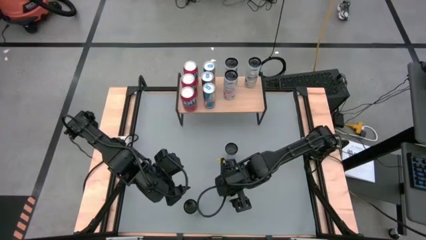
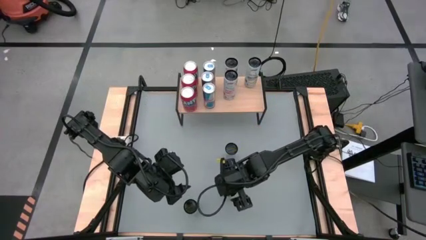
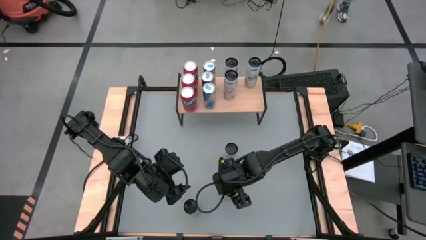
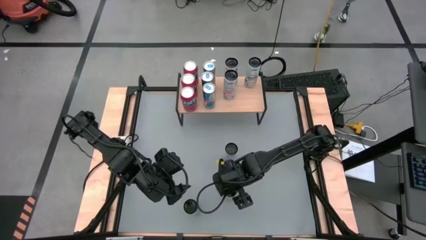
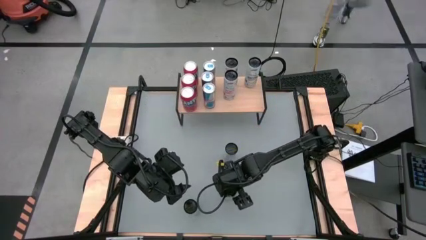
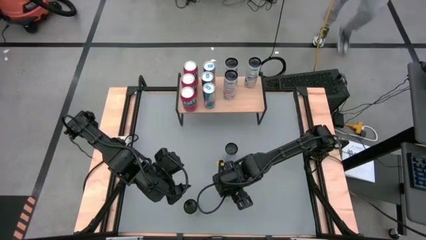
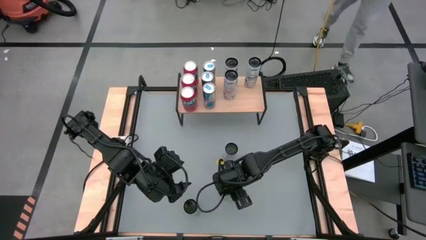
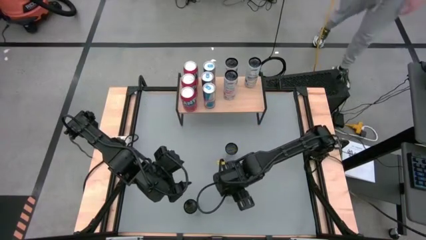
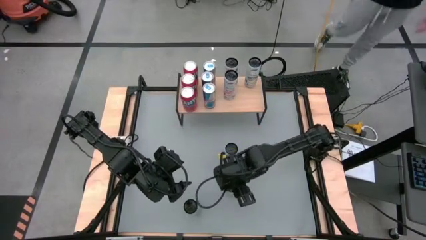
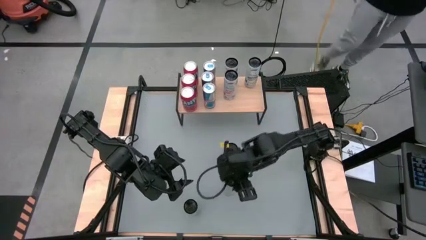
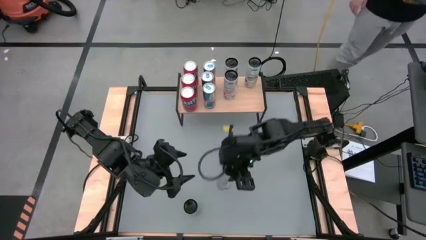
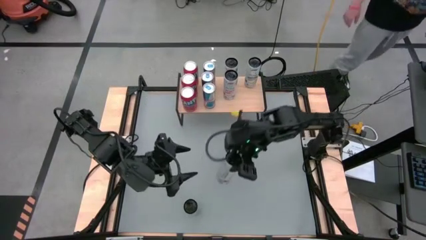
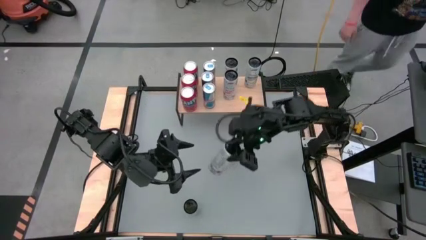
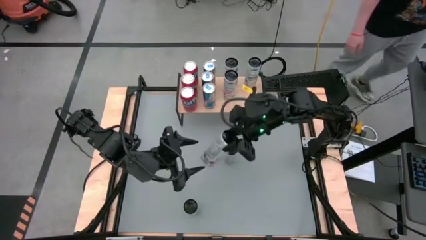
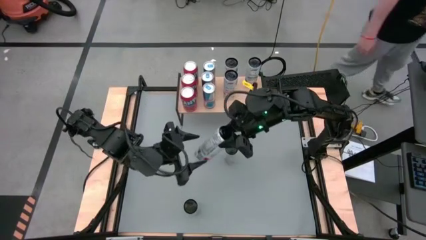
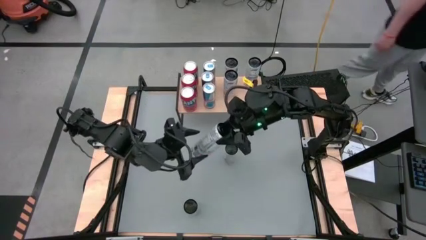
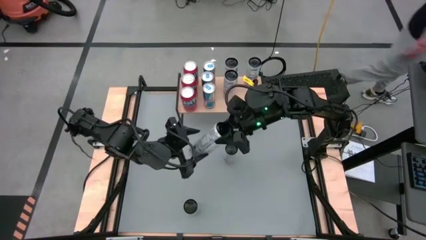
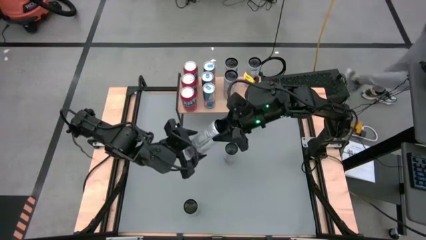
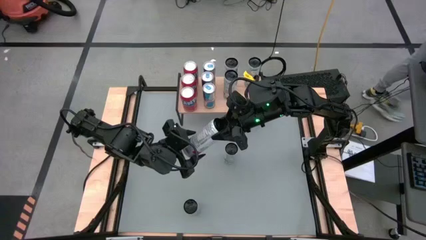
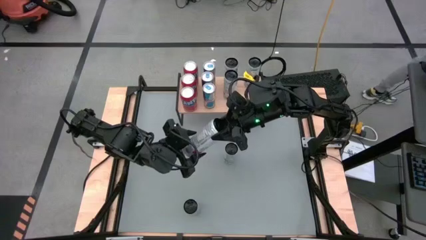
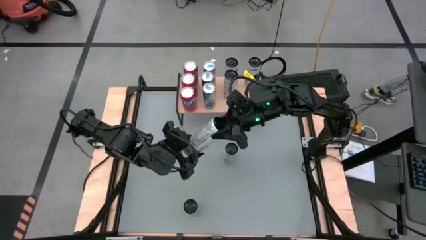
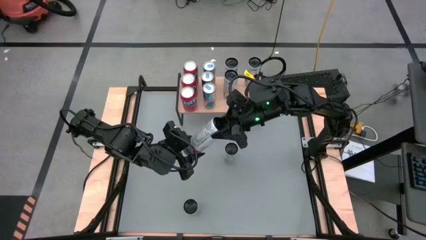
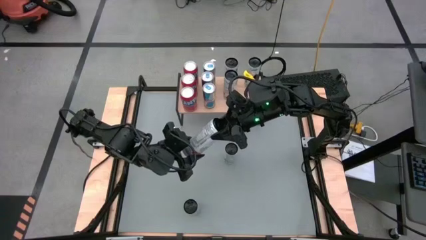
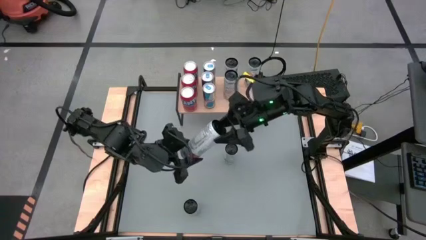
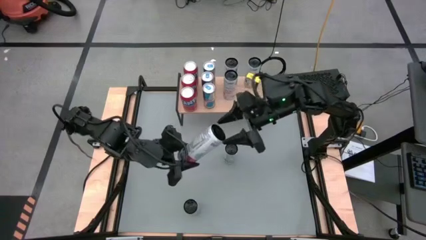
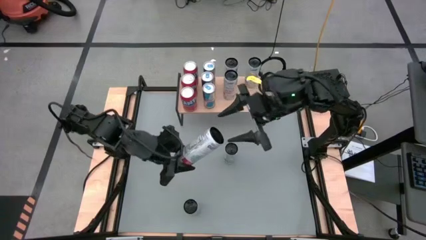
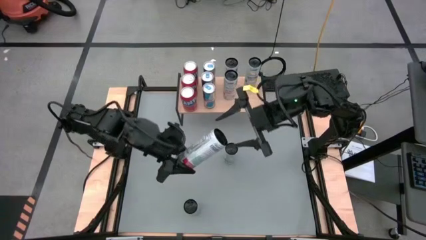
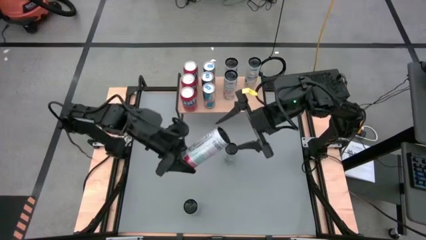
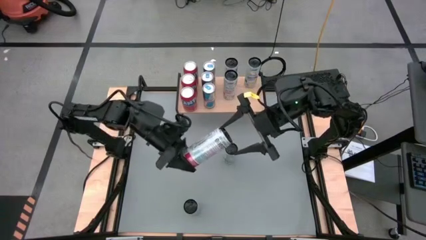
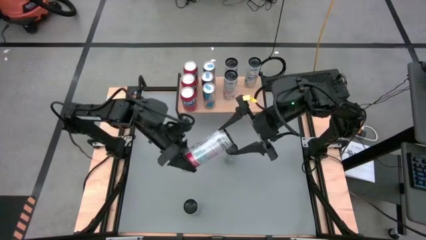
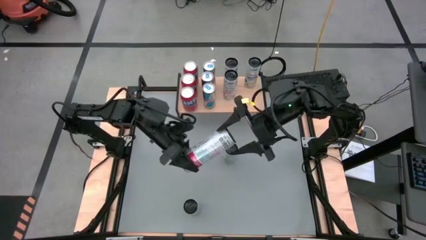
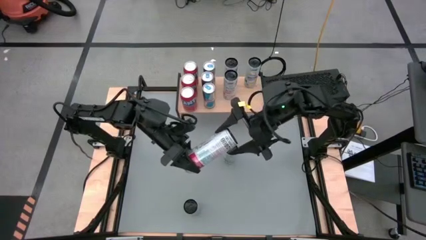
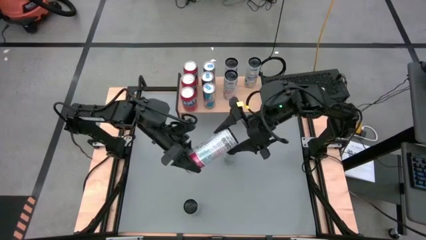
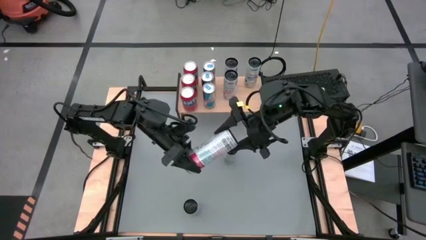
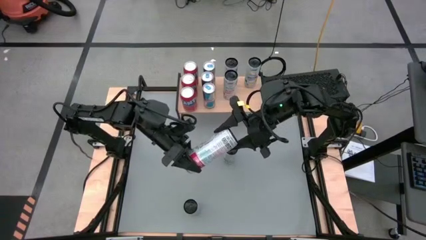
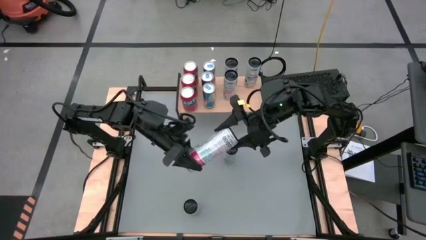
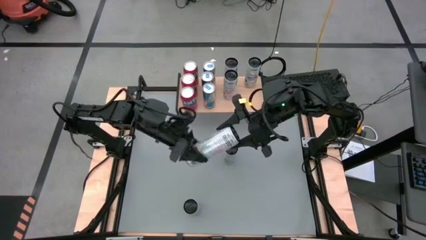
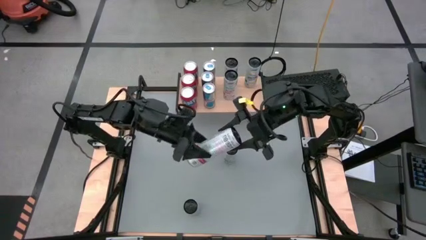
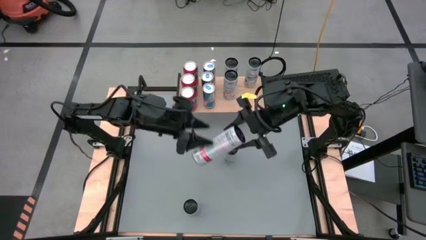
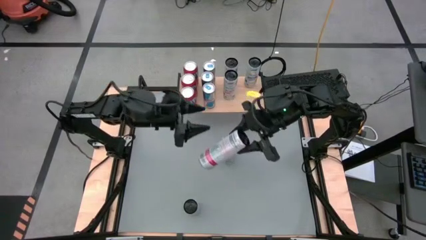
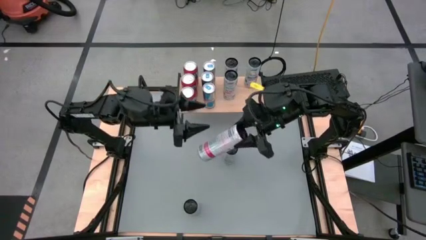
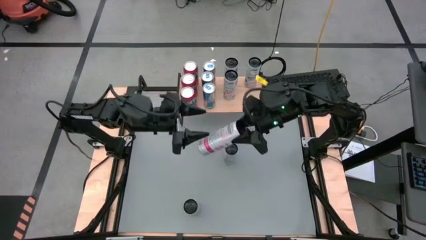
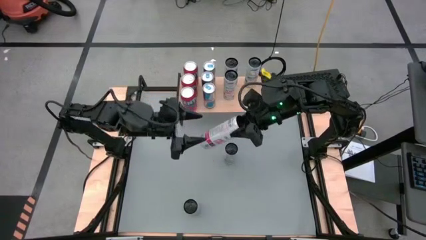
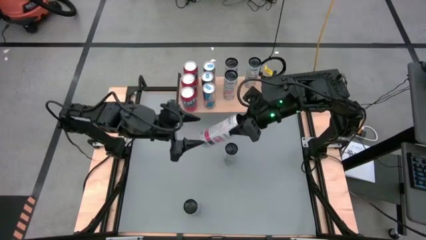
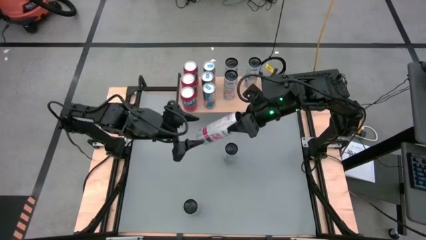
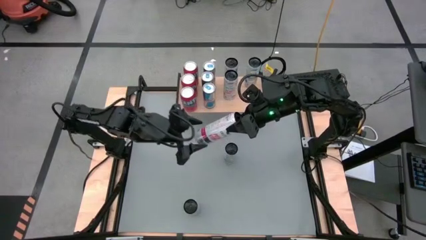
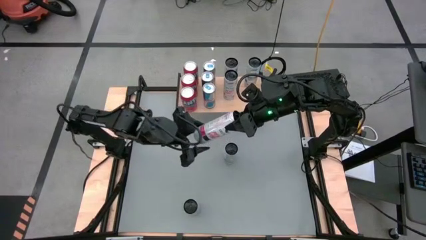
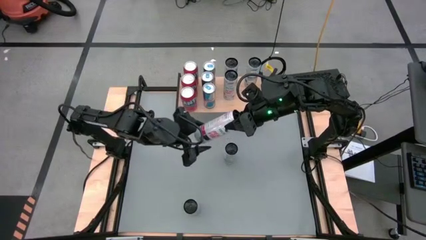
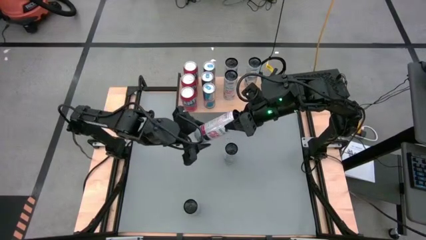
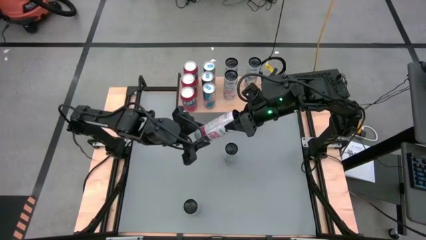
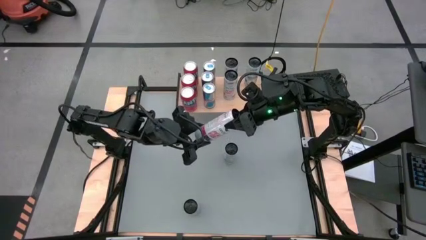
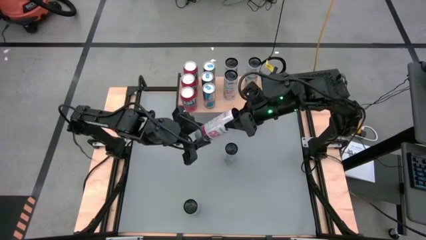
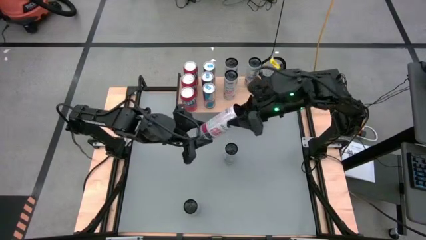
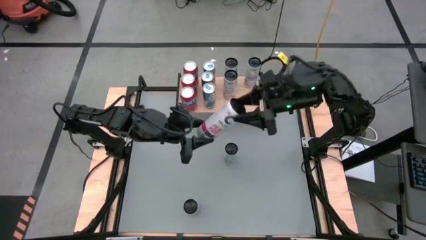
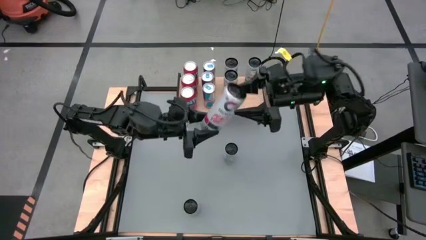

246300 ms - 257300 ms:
Task: Place canned beverage on shelf
Put the white-pink soda can on the shelf aligned with the other white-pink soda cans

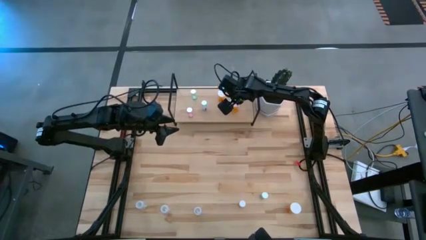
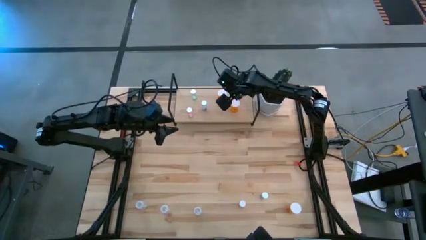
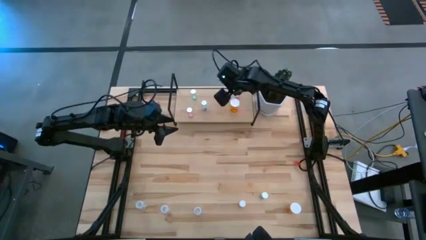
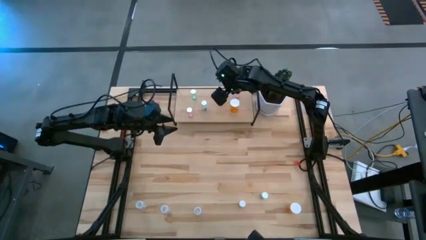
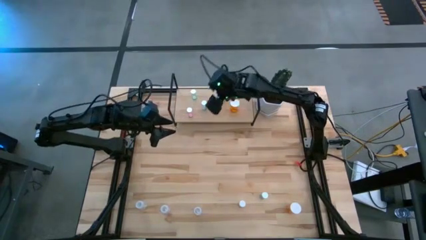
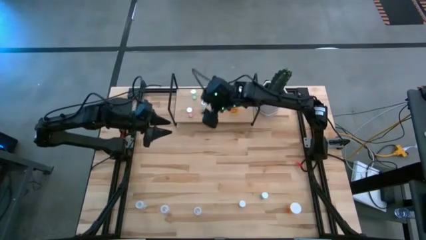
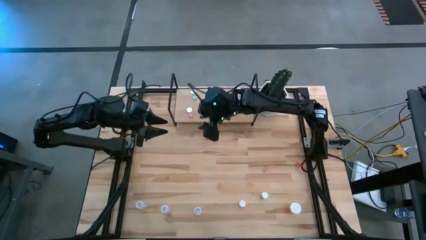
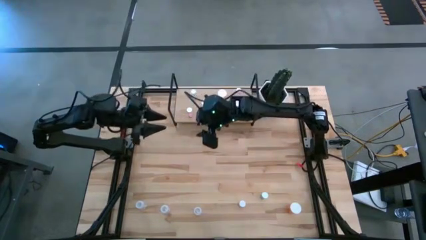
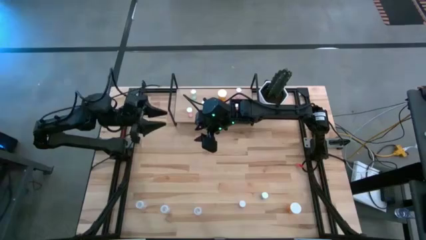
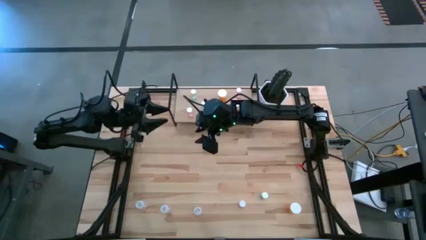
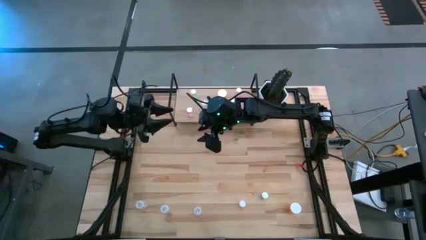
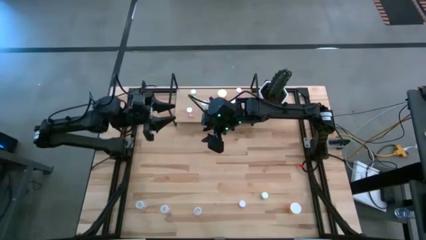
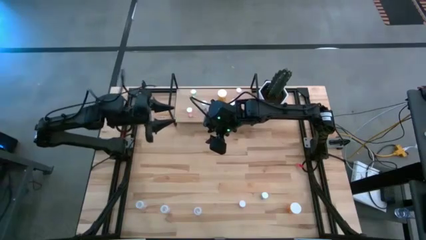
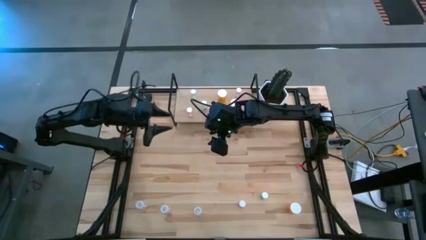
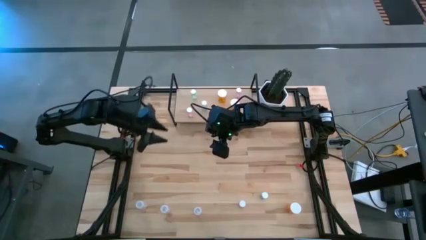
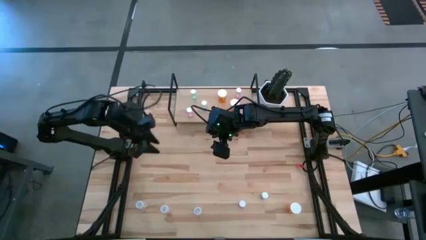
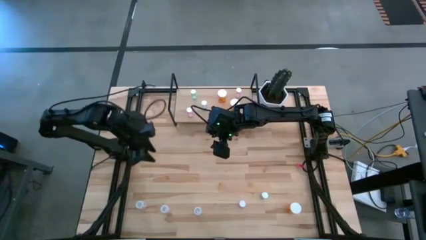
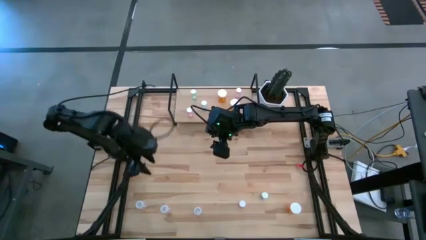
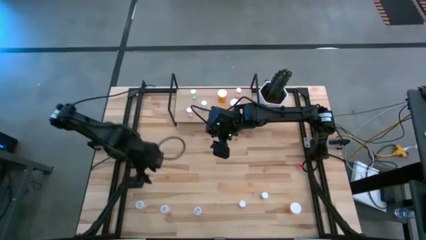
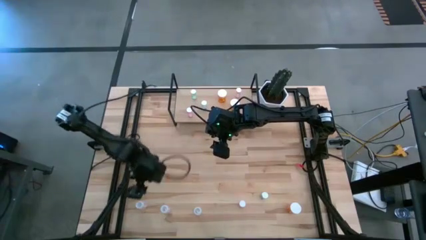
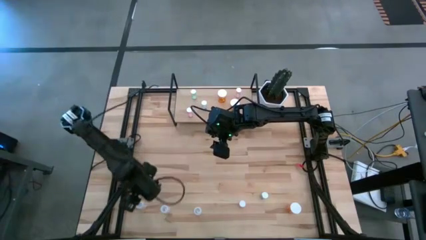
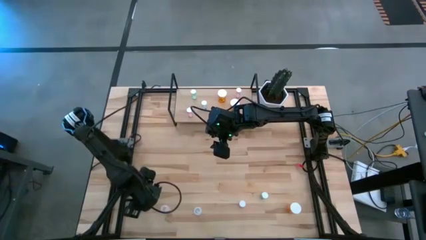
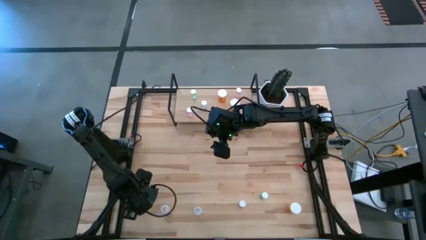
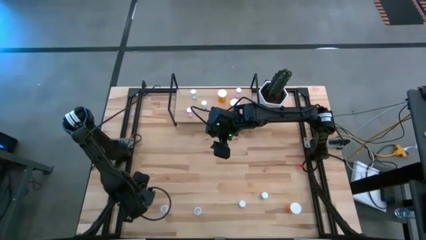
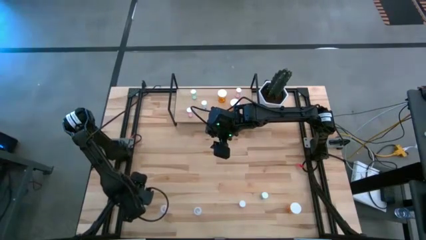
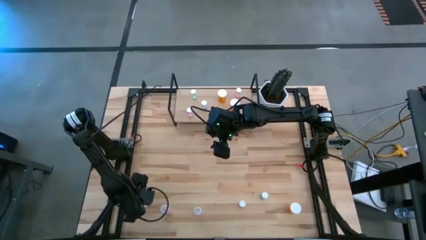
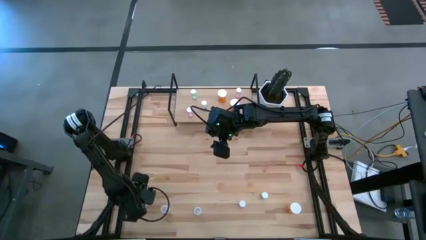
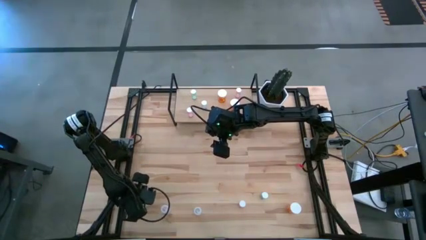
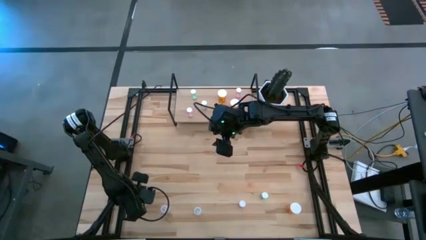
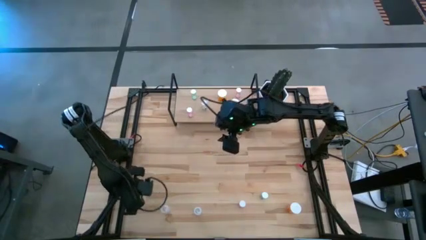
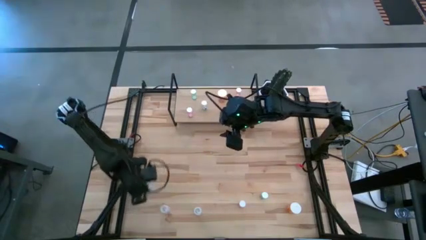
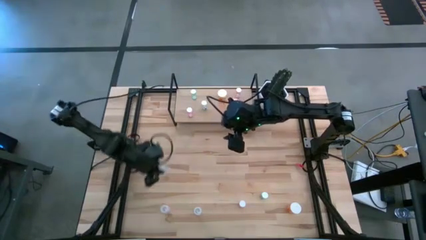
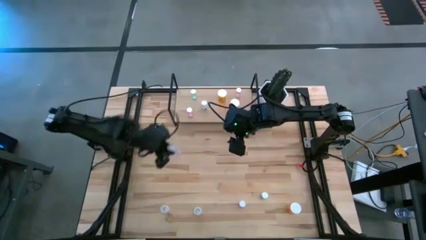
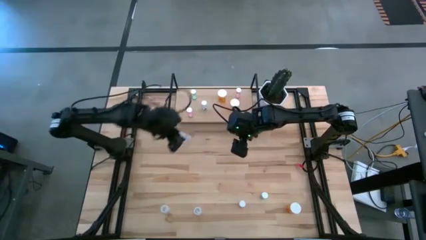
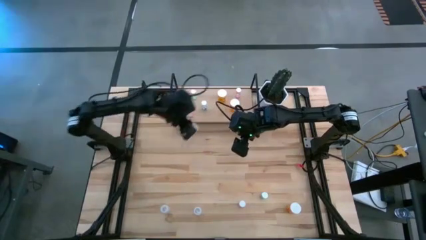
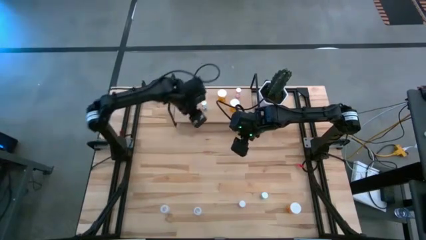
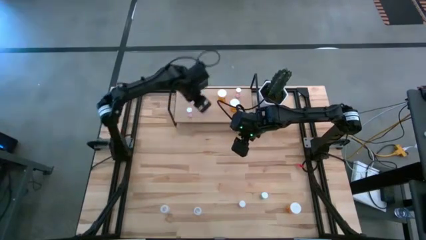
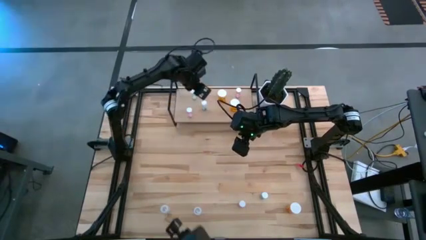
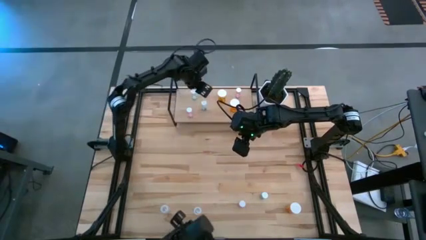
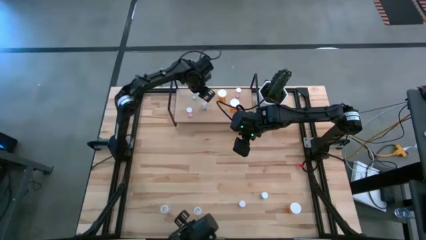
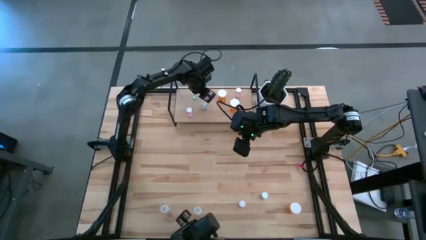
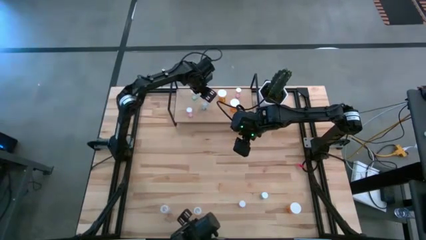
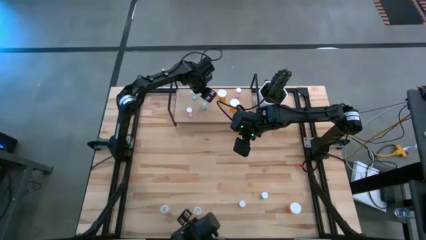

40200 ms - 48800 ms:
Task: Pick and place medicine bottles onto shelf by color
Put the left transparent pill bottle on the shelf
